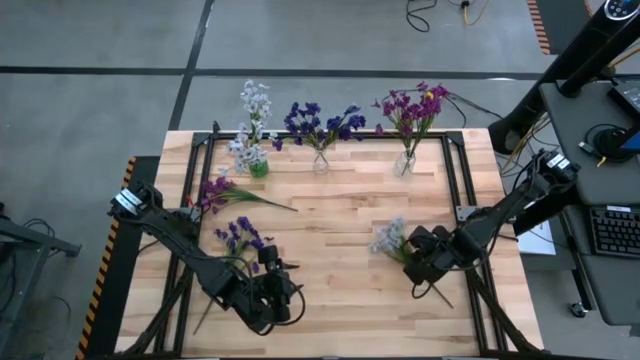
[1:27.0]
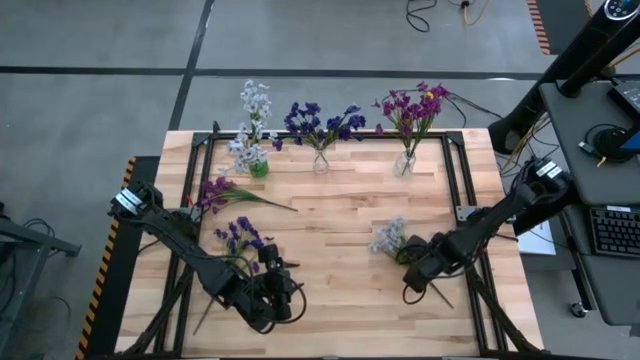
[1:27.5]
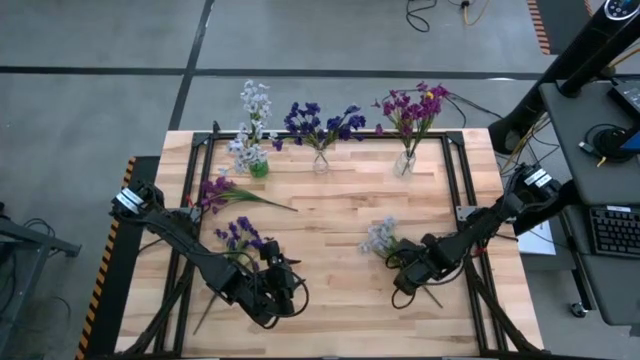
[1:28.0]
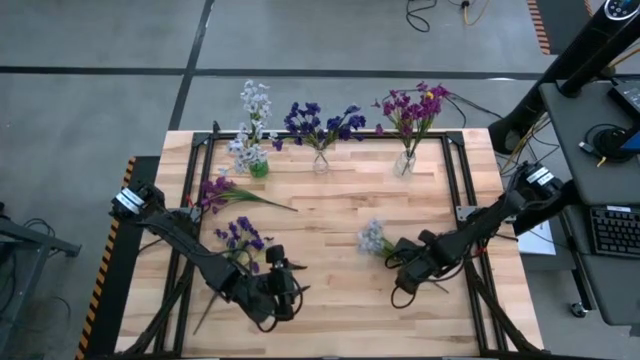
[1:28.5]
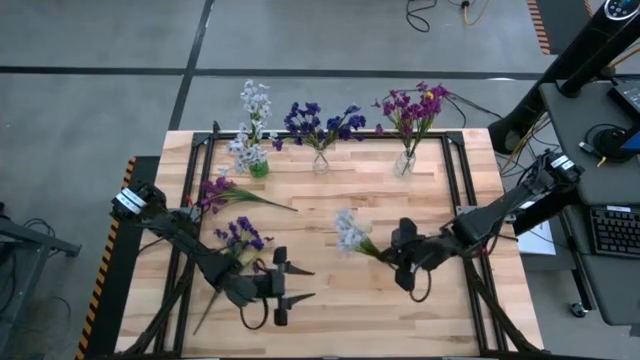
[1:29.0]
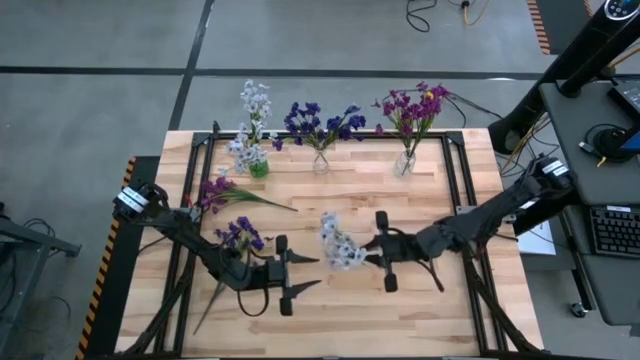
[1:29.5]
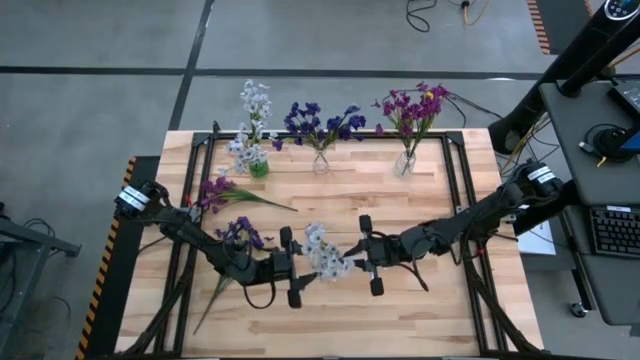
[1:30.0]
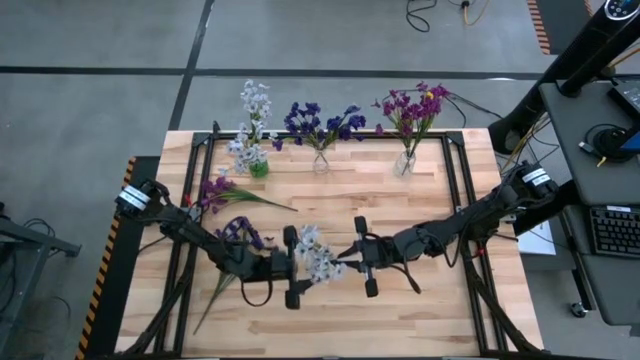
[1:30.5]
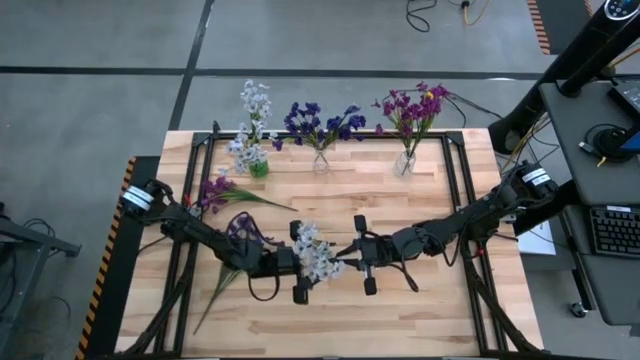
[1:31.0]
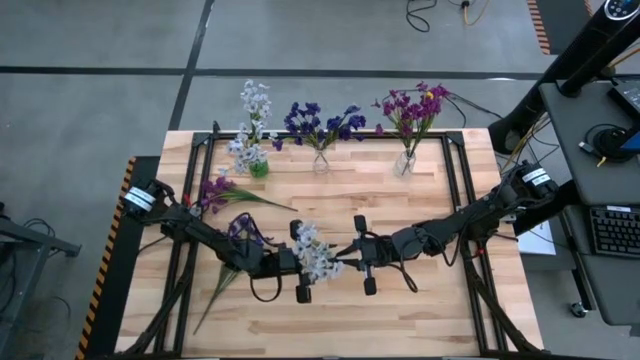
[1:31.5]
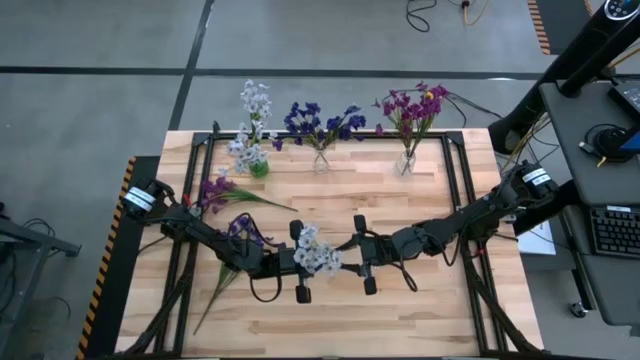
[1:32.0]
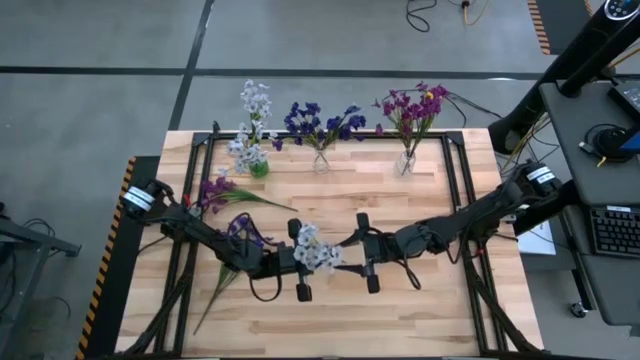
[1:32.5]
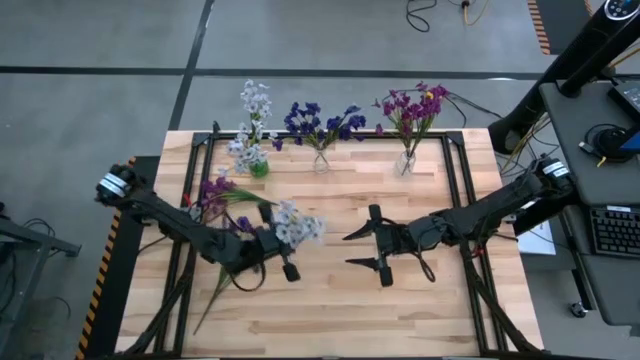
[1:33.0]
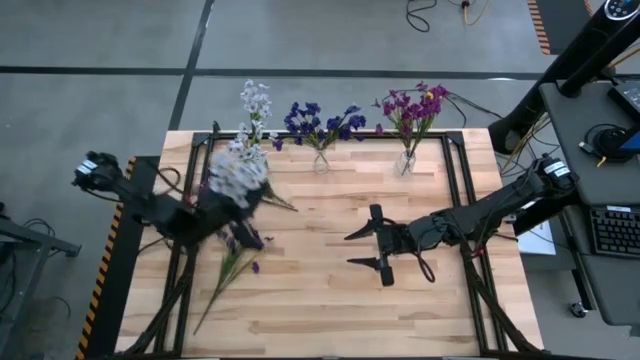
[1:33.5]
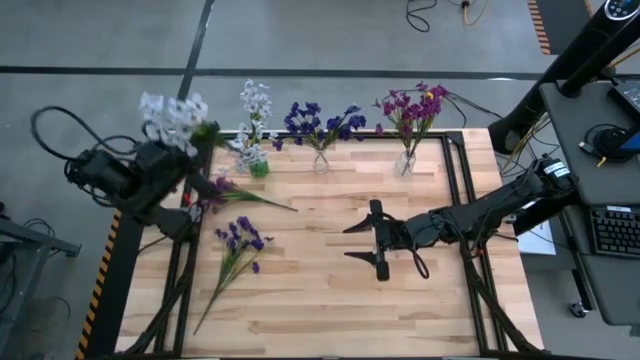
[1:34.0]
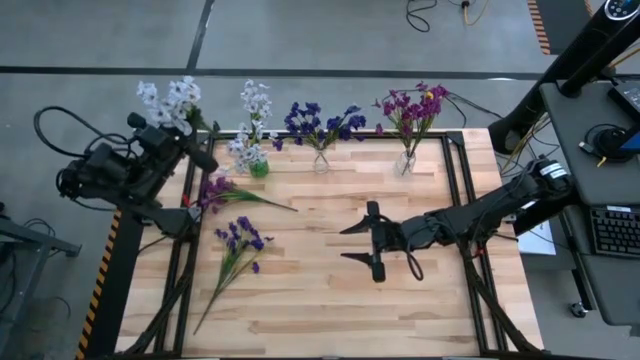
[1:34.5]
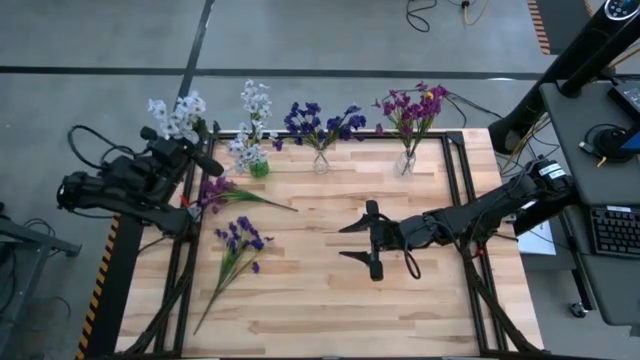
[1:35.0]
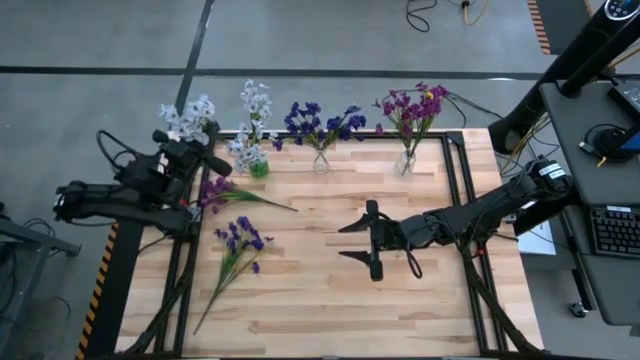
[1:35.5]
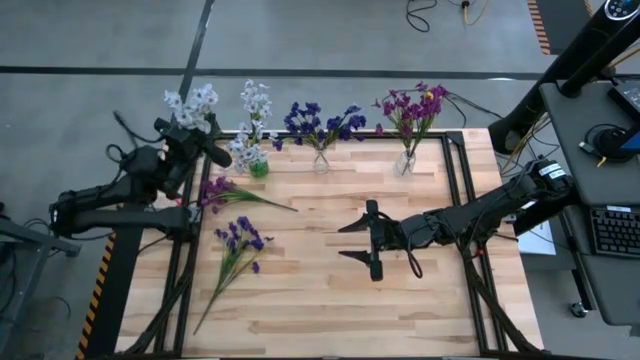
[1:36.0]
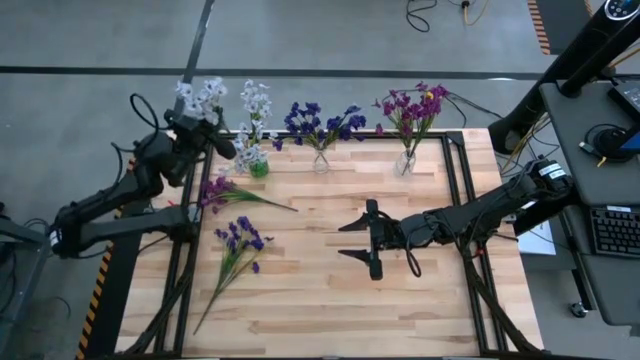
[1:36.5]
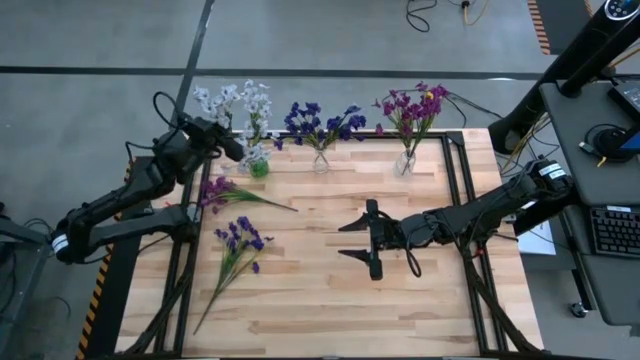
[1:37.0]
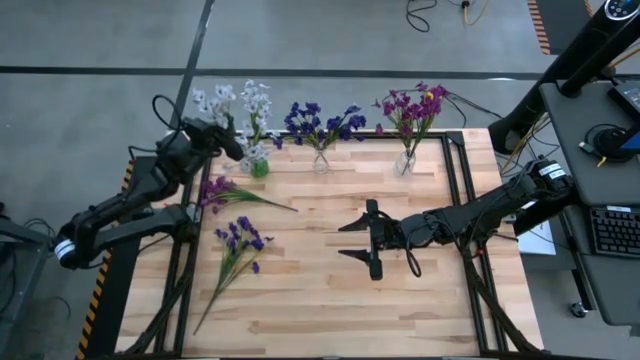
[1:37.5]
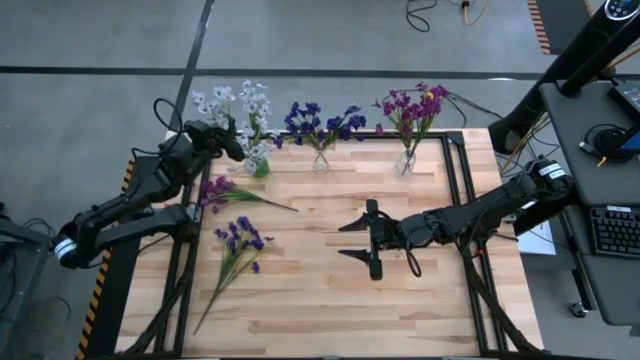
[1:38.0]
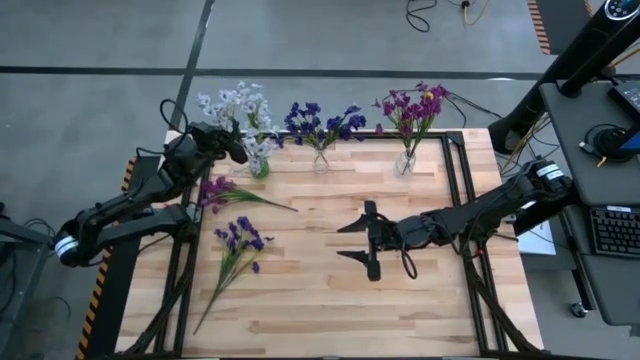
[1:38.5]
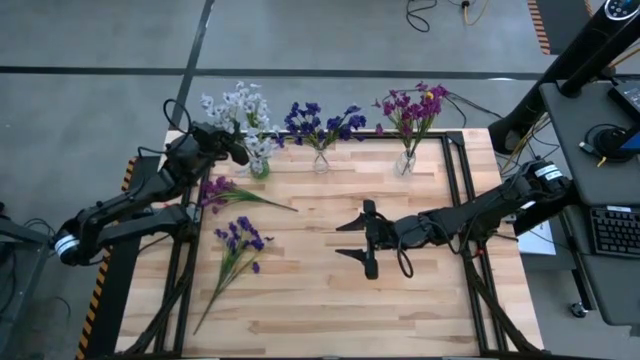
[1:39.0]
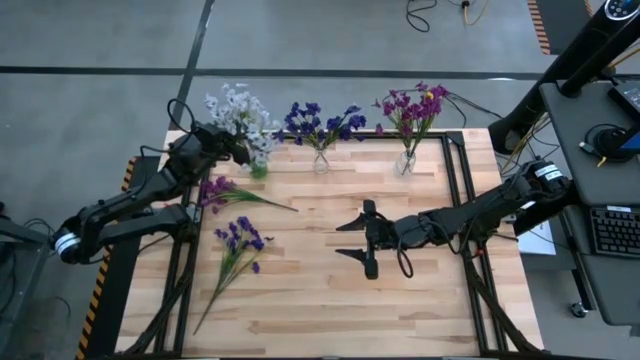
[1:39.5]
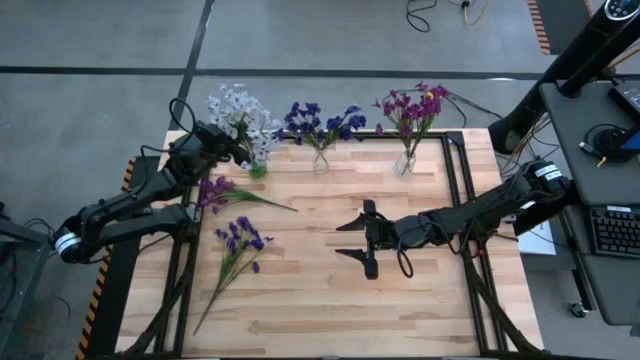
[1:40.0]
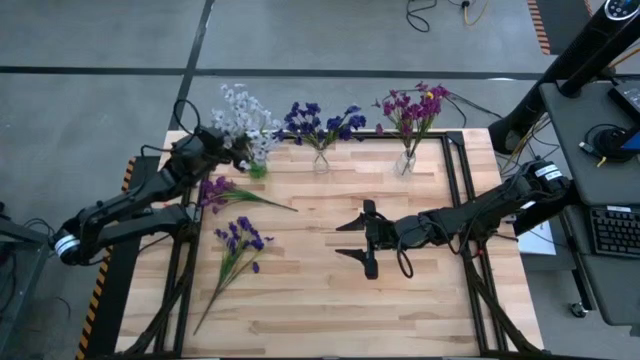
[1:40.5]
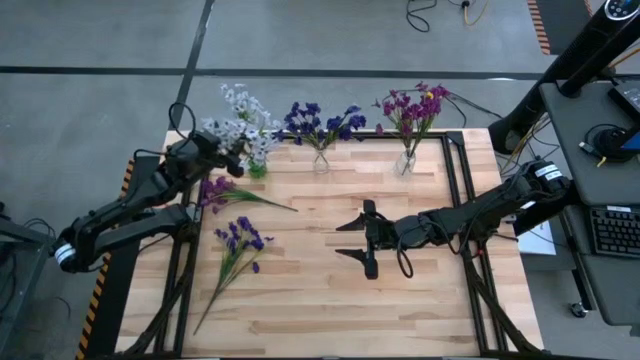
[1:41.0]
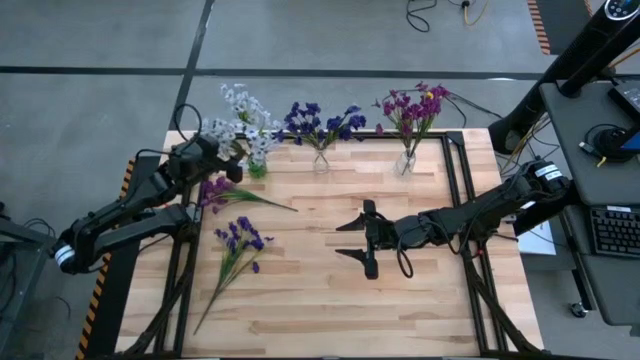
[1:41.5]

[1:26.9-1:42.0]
Task: Sort flowers into vase by color
Put the white flowers into the green vase

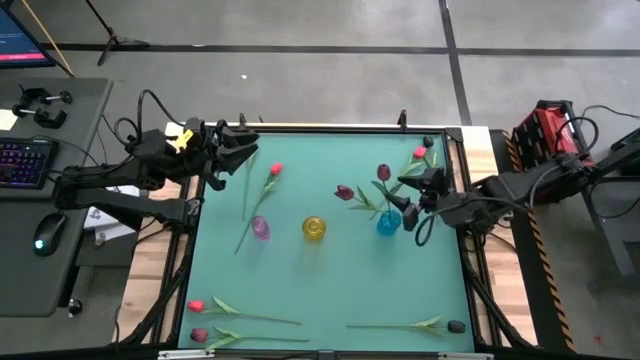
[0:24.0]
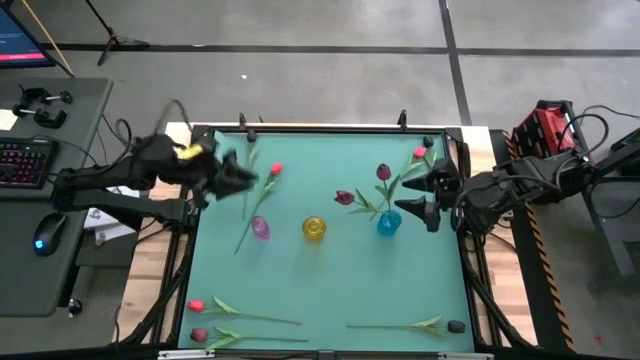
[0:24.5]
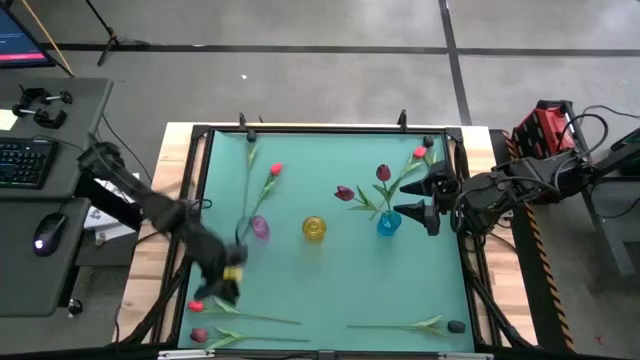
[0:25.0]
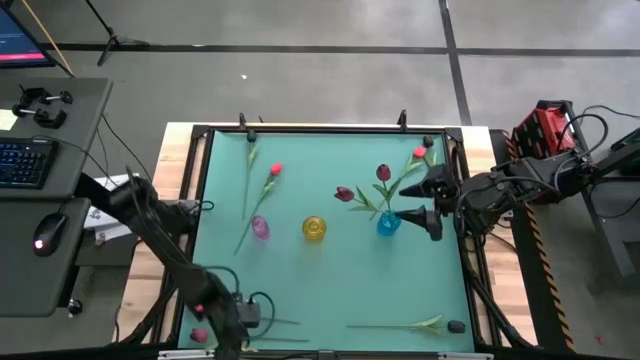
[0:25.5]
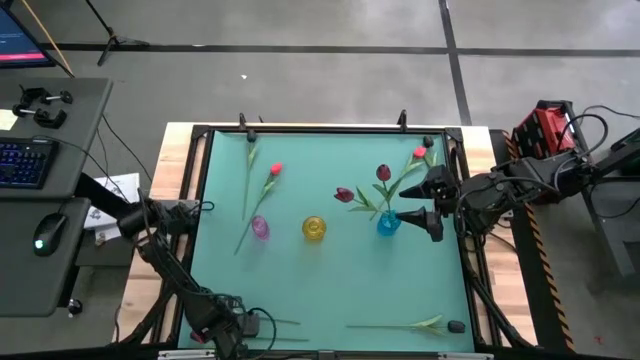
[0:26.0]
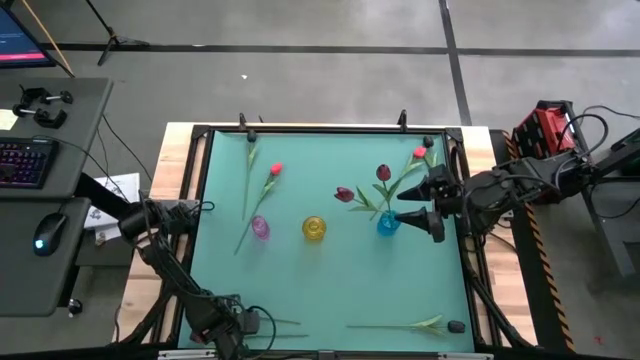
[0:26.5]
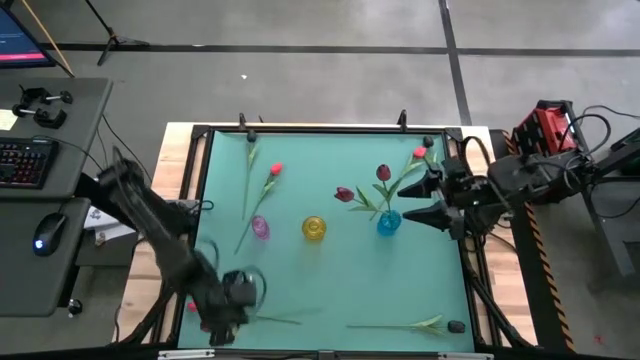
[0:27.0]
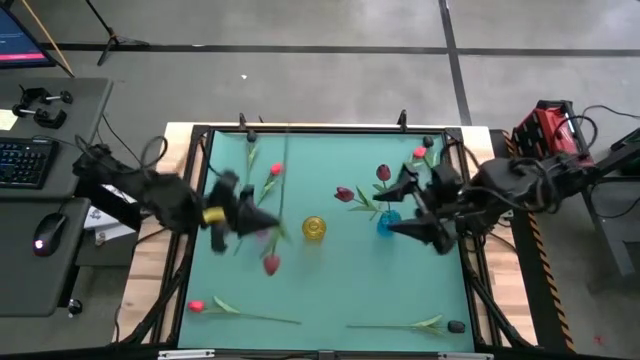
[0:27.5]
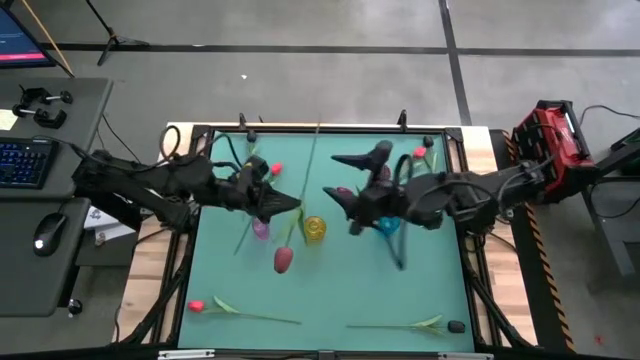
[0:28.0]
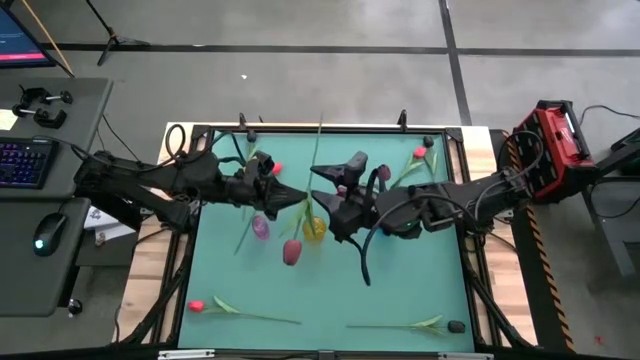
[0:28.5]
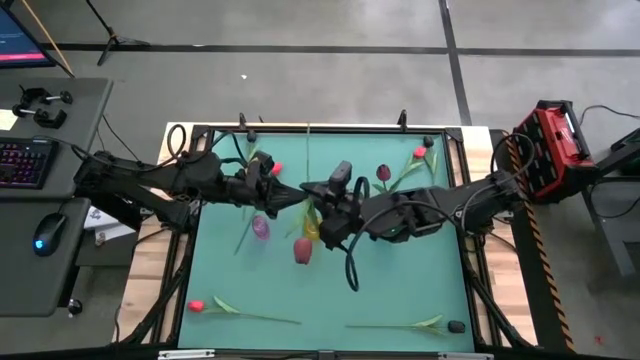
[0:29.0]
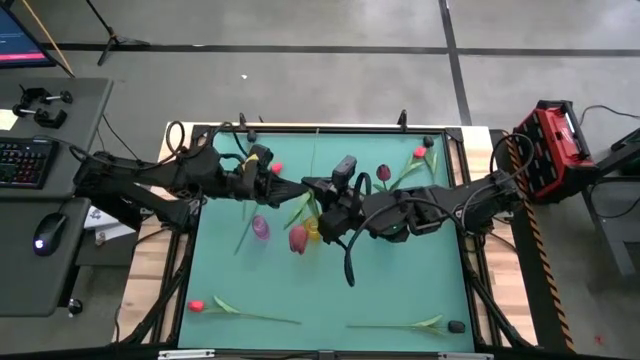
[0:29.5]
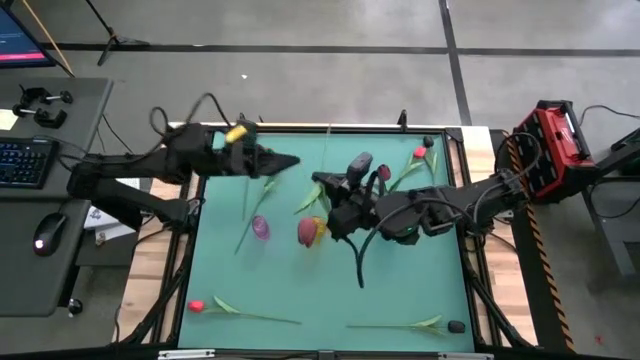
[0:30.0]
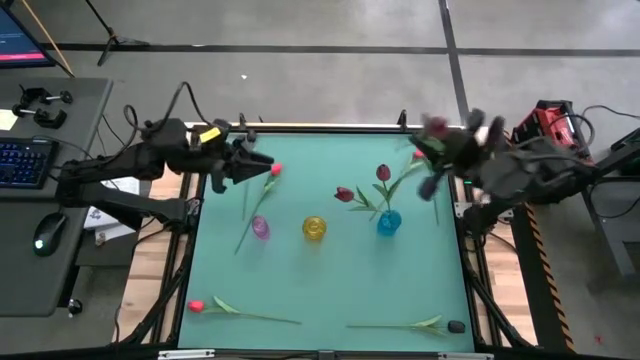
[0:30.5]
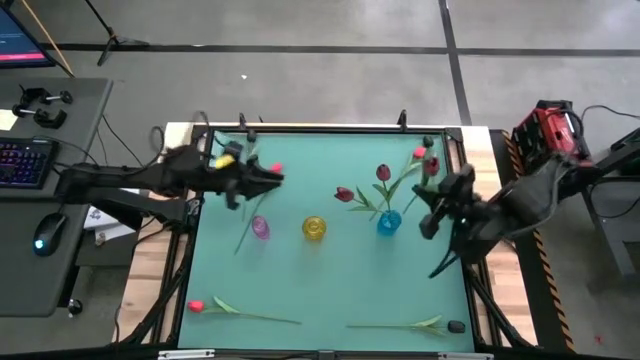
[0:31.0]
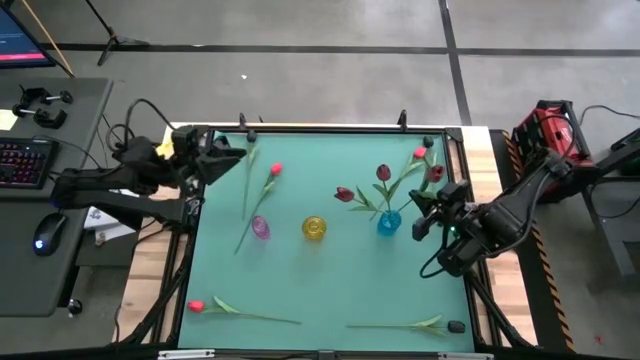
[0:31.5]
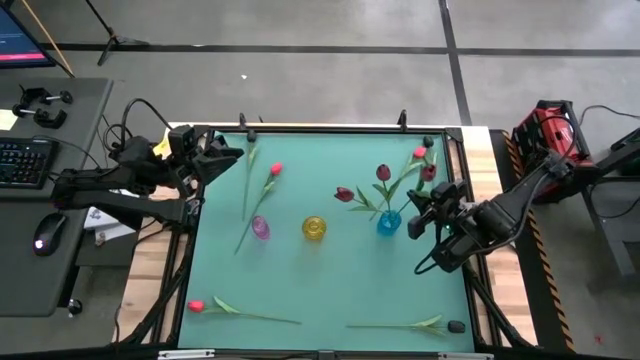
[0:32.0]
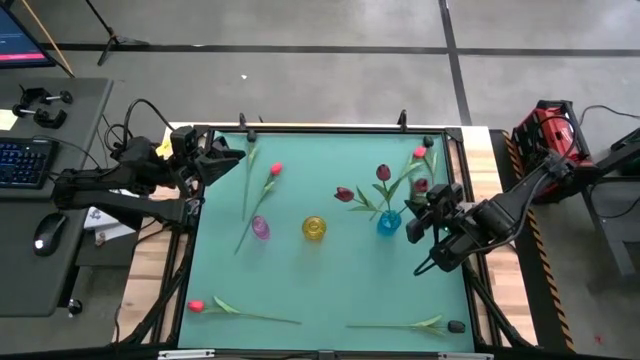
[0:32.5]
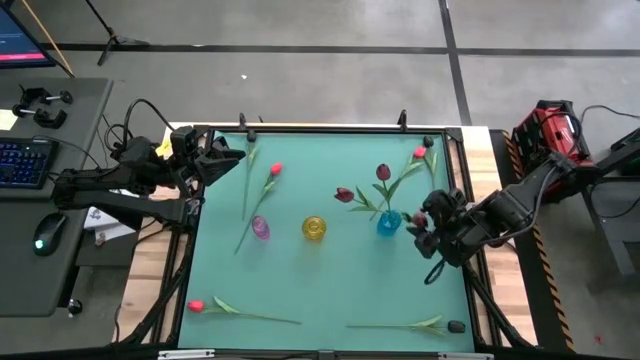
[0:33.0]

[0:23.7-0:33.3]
Task: Sort flowers into vase by color
Put the dark red flower into the blue vase
